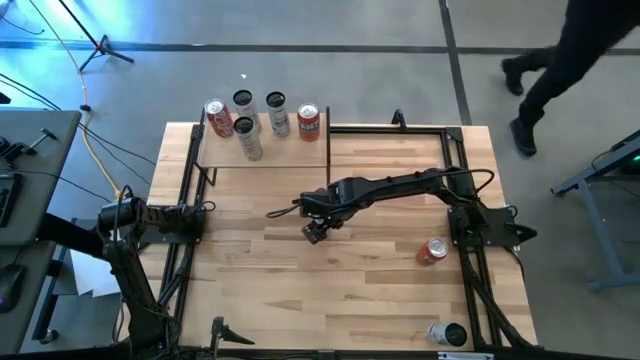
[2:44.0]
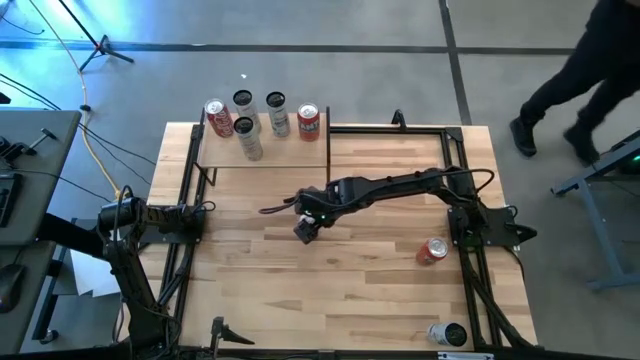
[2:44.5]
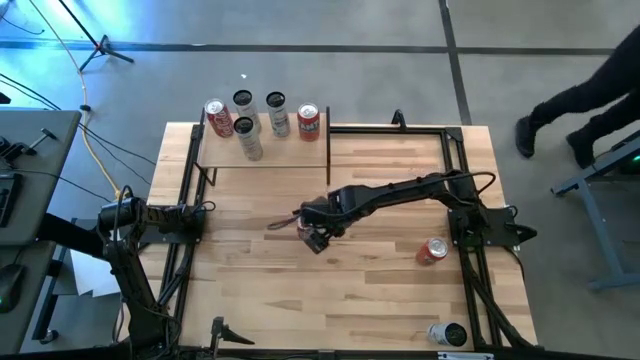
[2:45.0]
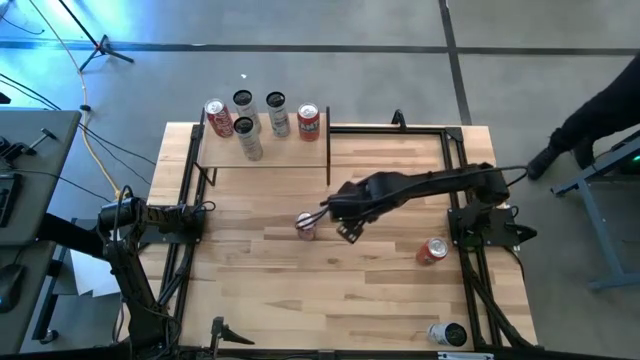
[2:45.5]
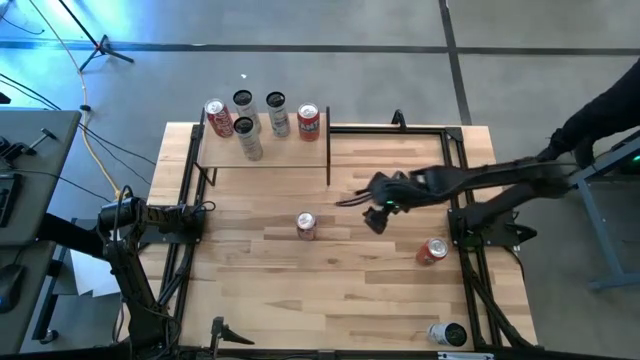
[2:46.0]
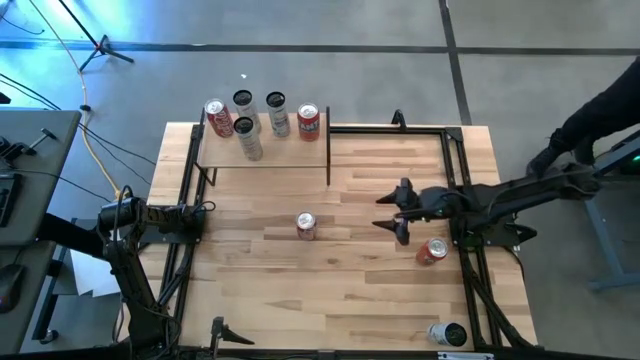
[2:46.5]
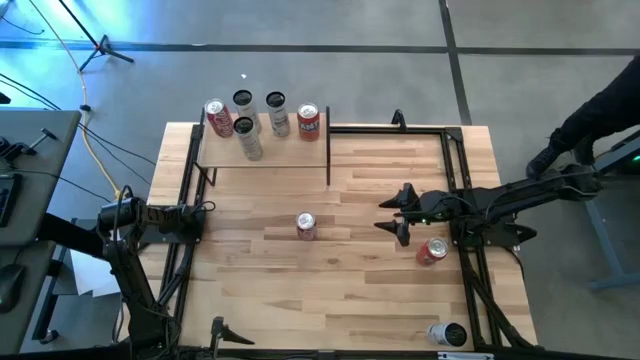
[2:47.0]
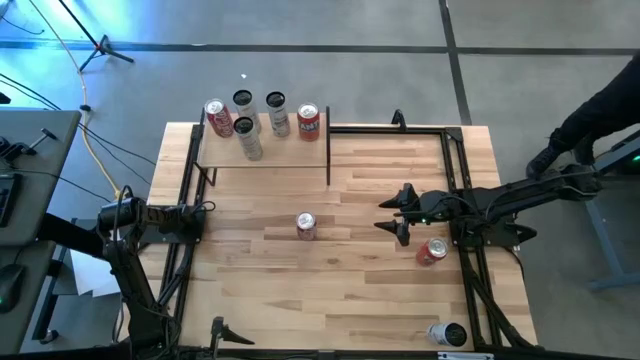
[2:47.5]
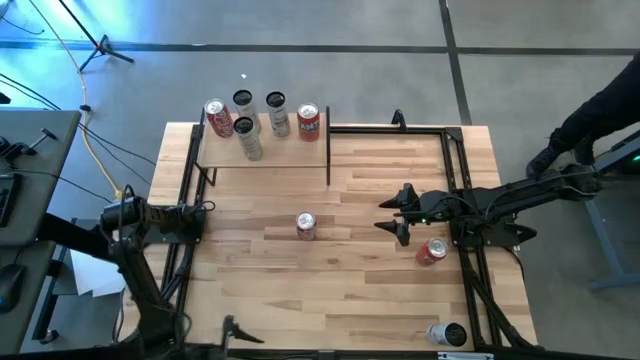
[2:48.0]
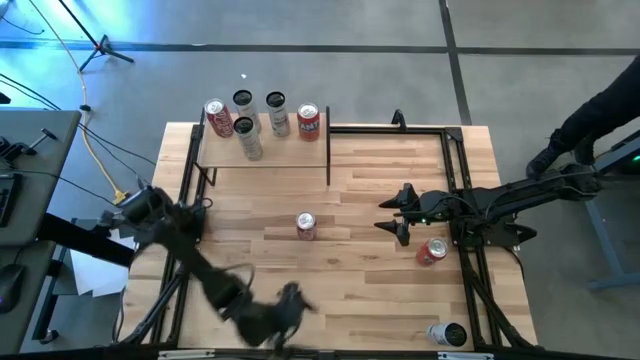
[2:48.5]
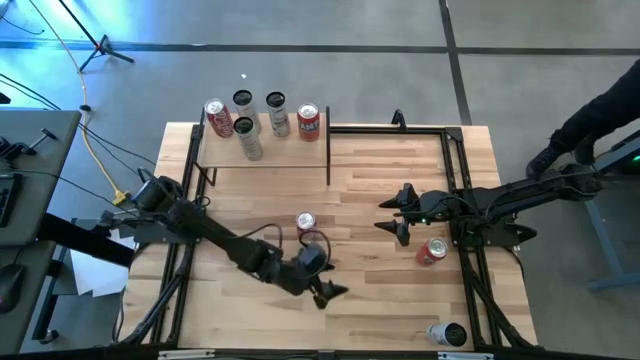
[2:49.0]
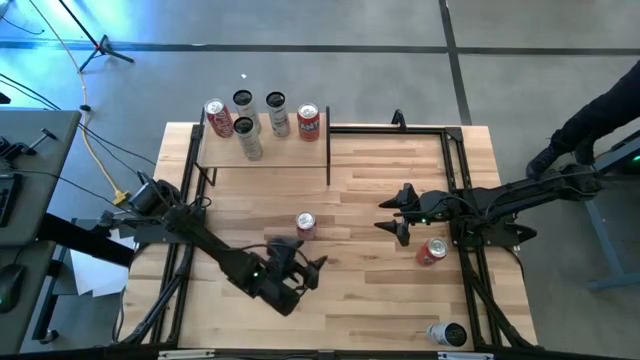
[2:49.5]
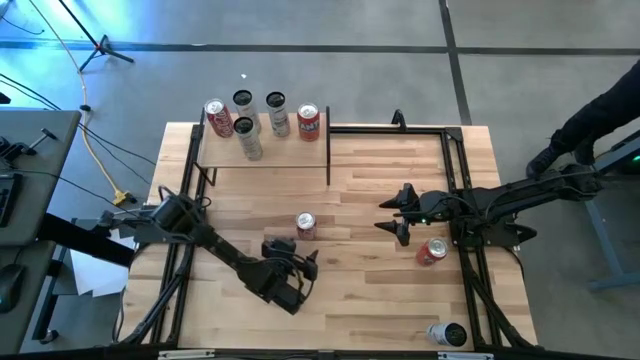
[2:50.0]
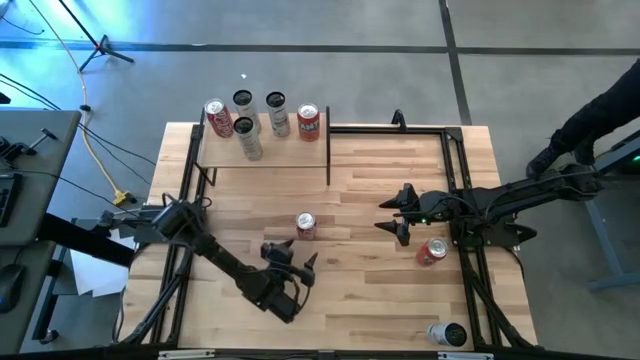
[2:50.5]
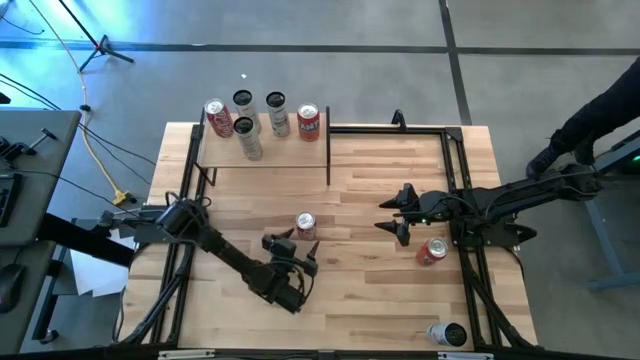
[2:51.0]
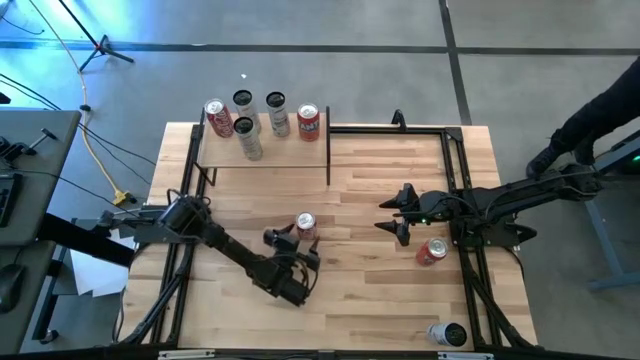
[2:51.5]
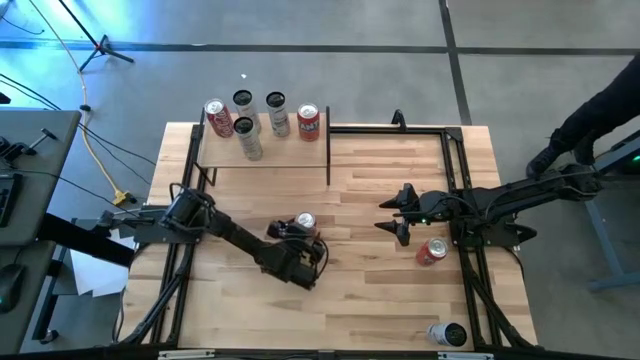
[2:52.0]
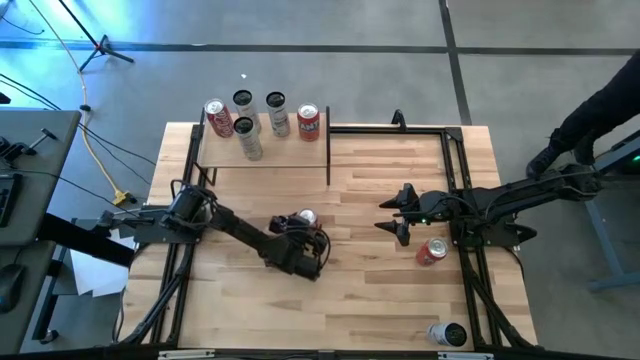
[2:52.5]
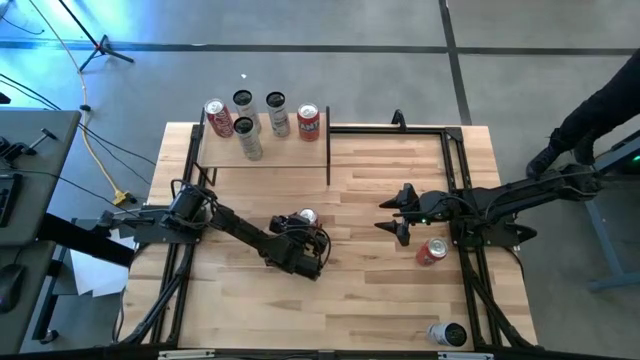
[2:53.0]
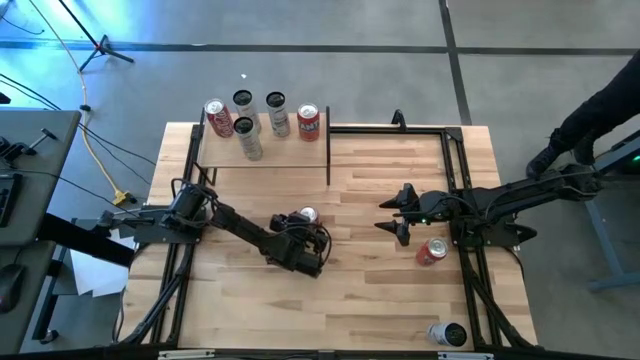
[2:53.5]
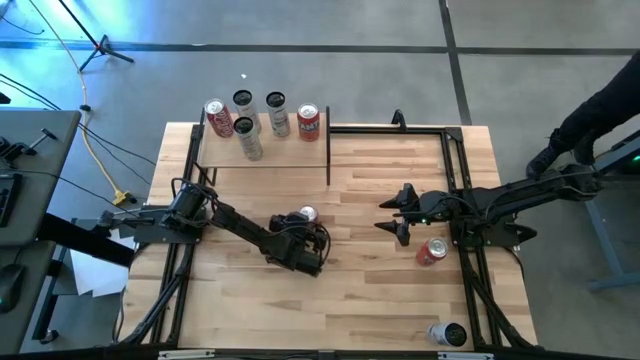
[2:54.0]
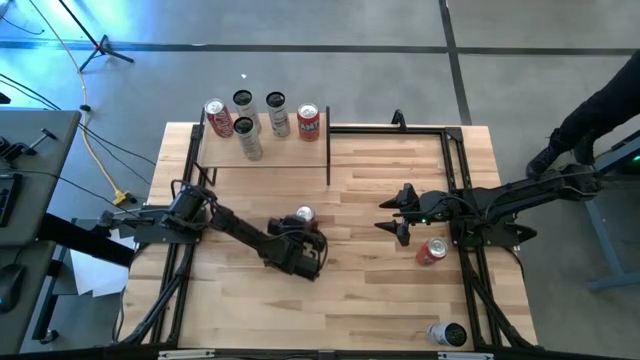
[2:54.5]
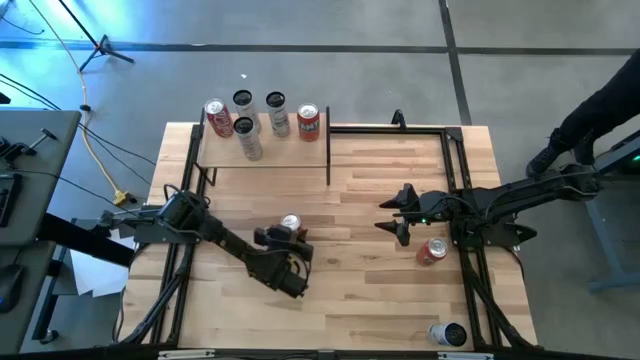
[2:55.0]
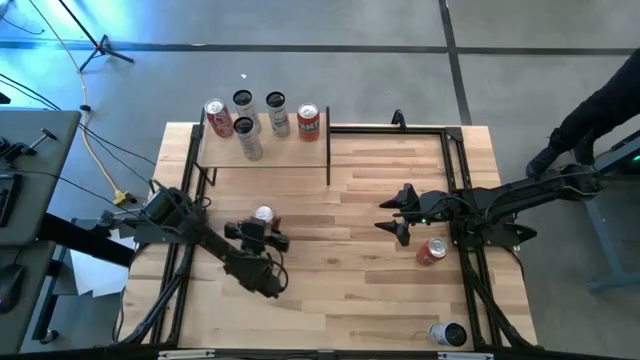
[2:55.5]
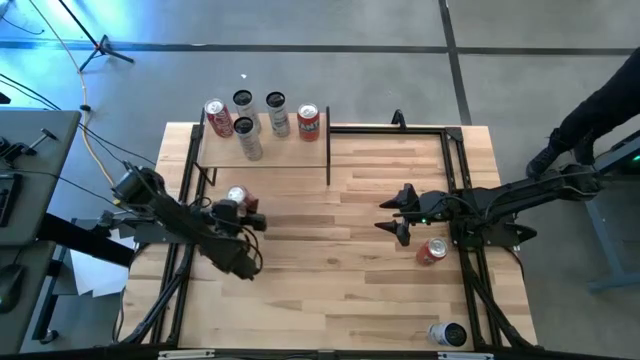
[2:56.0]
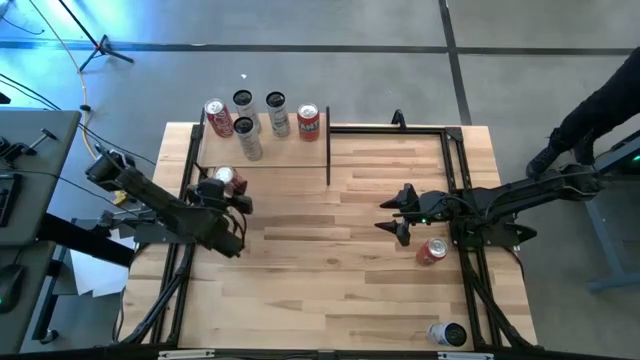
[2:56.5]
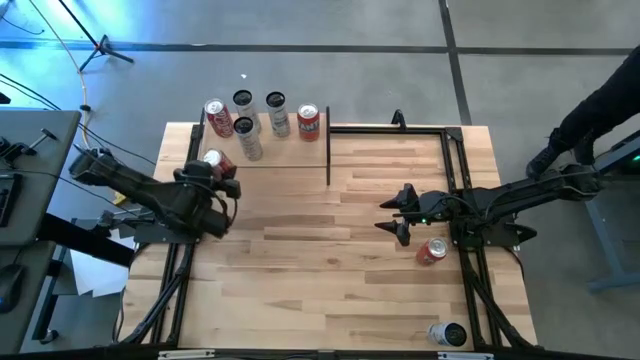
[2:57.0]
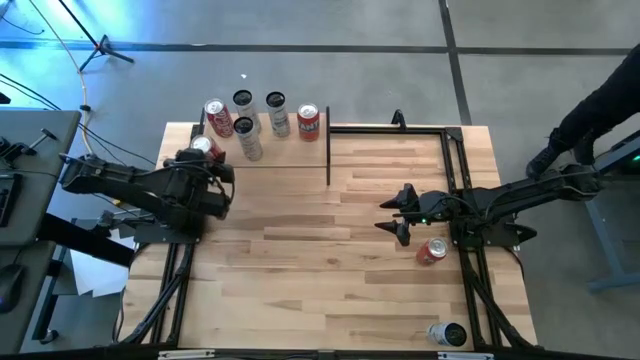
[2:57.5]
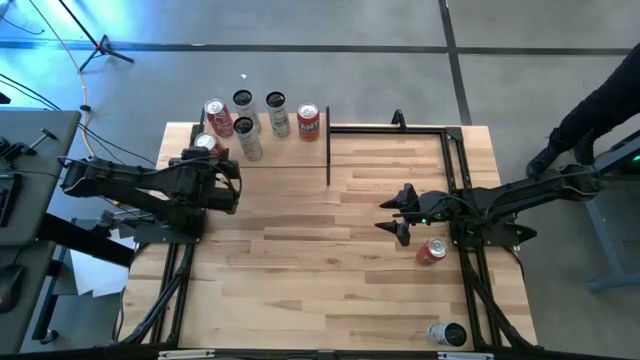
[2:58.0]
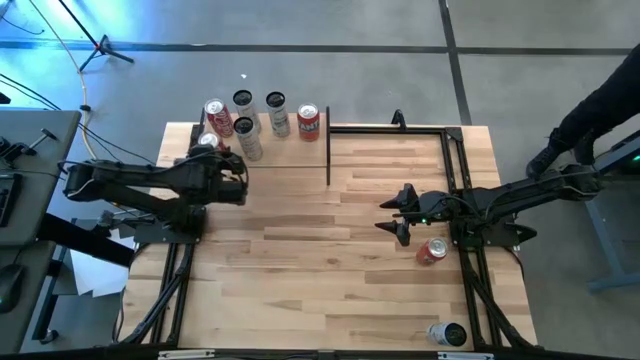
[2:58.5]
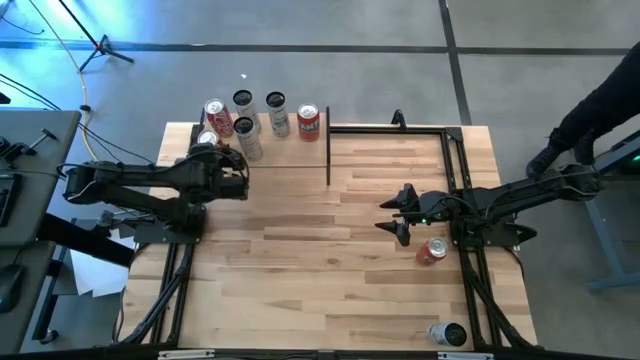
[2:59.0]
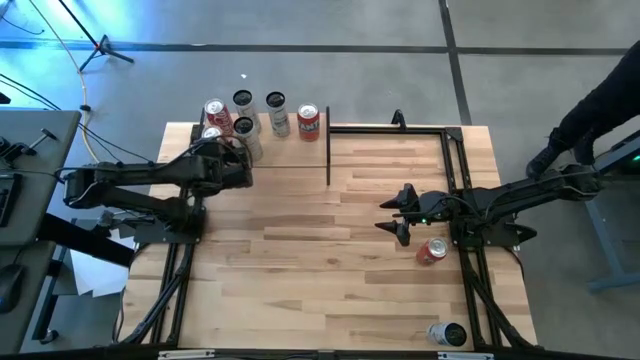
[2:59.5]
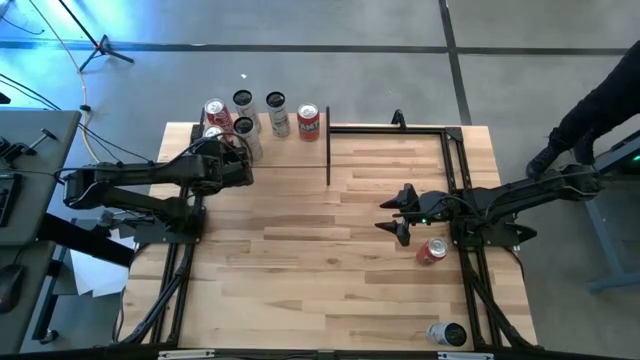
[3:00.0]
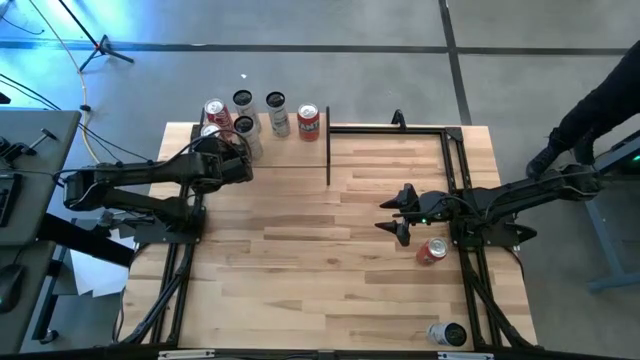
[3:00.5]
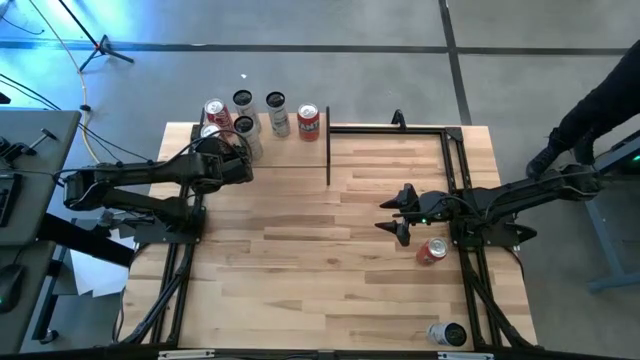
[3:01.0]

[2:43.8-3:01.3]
Task: Place canned beverage on shelf
Put the red soda can on the shelf aligned with the other red soda can

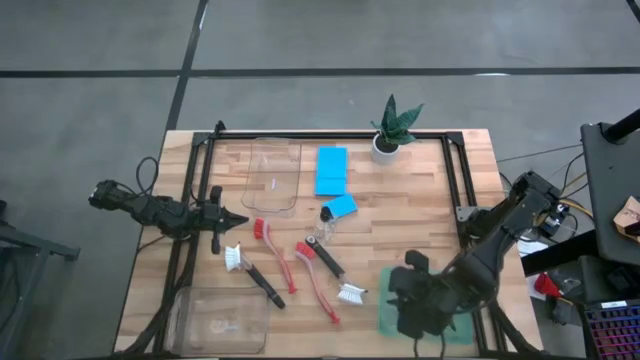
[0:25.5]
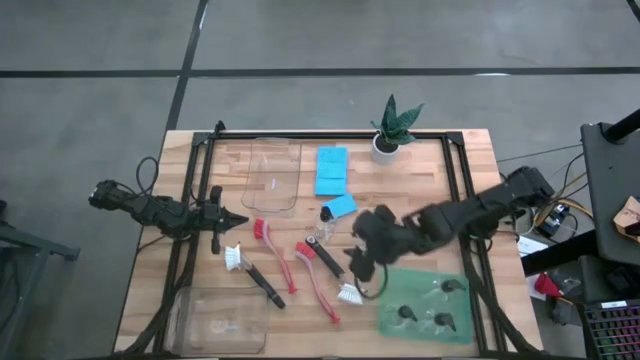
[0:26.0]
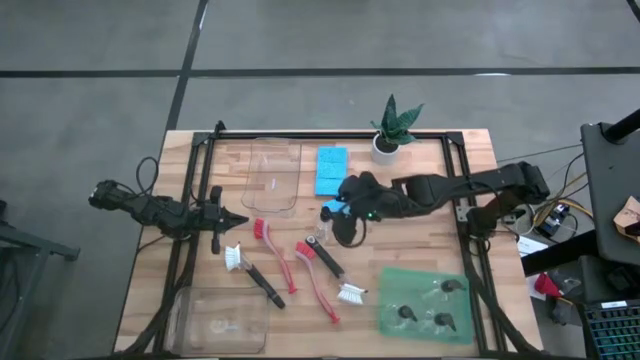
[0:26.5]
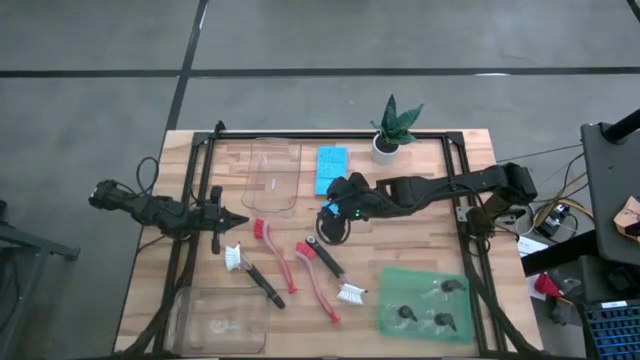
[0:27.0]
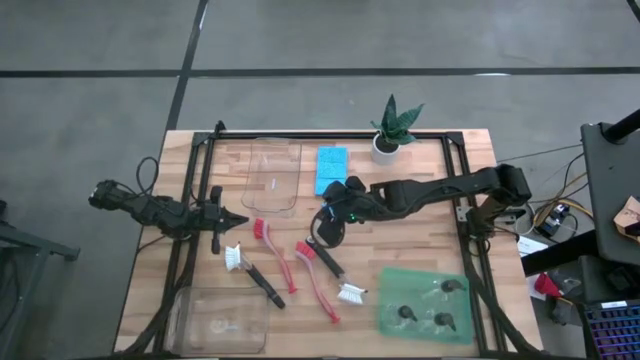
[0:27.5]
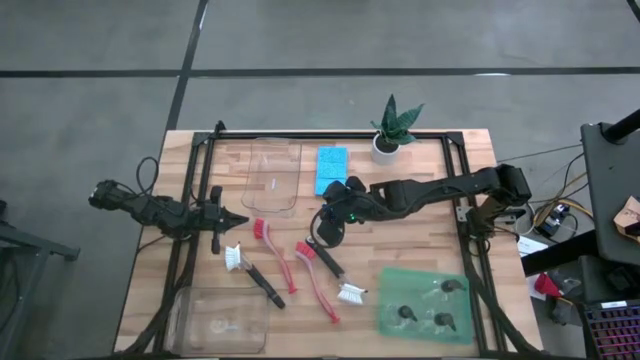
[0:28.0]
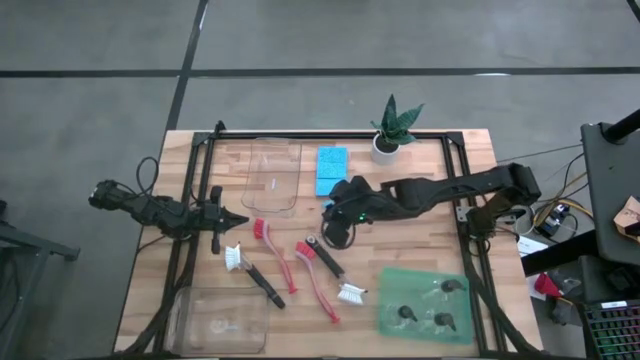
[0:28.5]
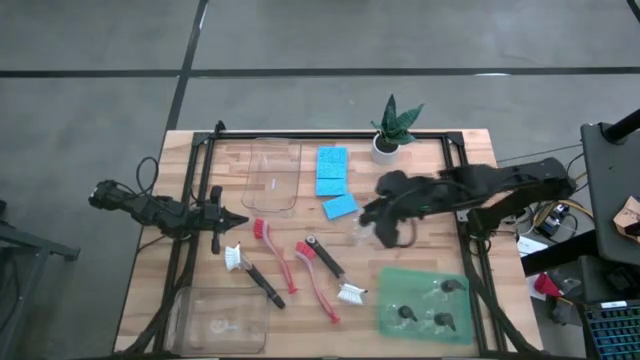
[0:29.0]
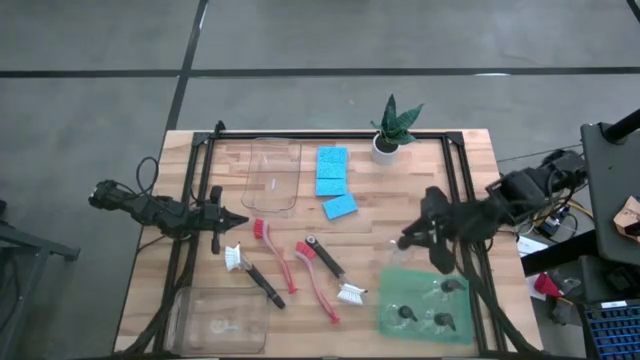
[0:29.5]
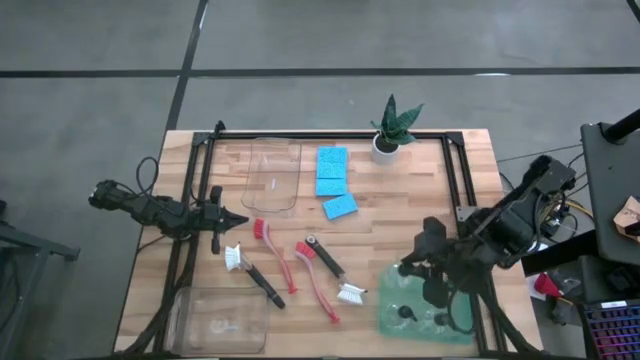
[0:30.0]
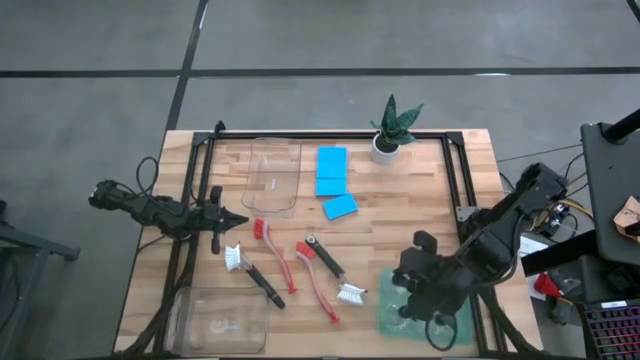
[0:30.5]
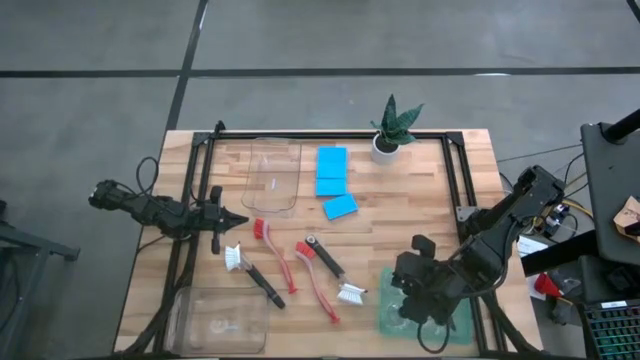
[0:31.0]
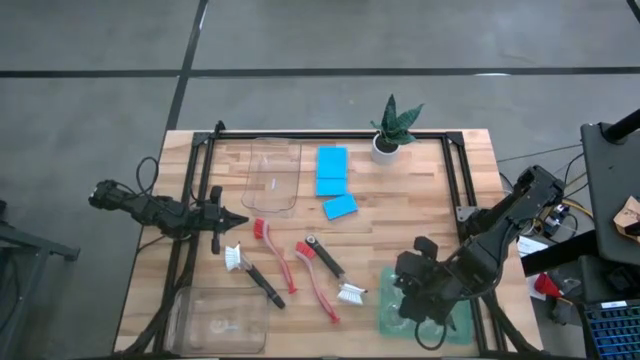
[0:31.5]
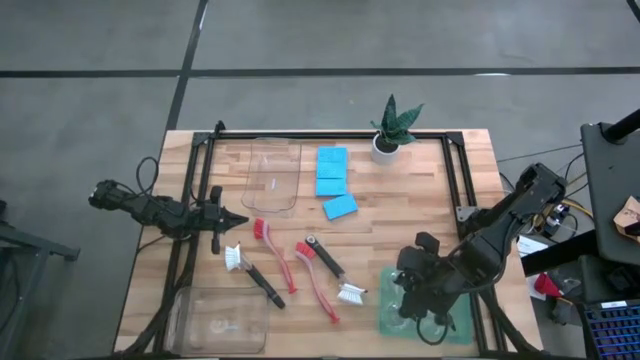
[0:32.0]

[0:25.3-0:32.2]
Task: Pick & Place Kitchen Sink Supplies
Put the sprayer bottle into the green bin
